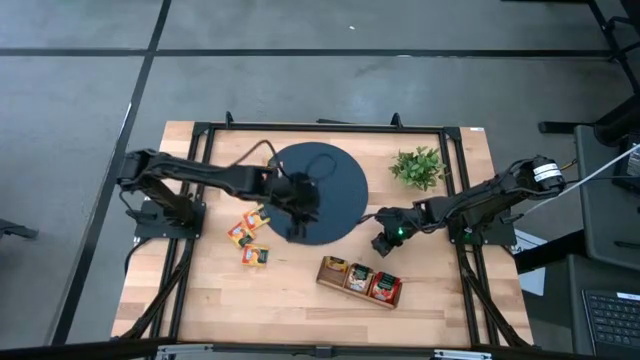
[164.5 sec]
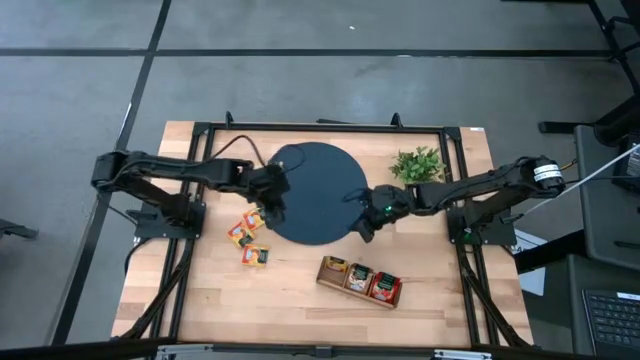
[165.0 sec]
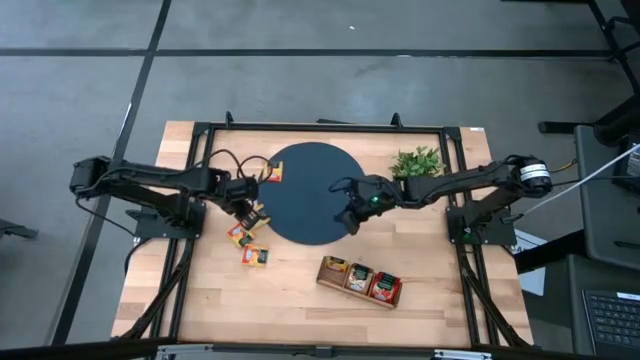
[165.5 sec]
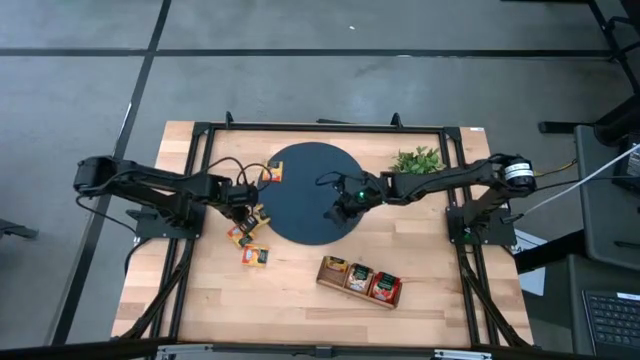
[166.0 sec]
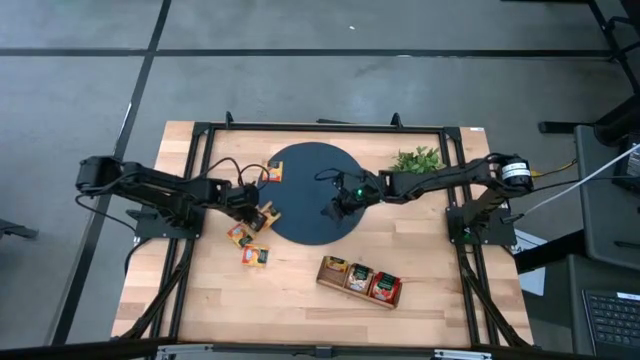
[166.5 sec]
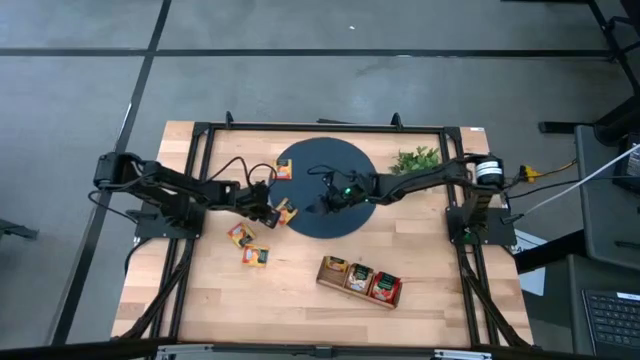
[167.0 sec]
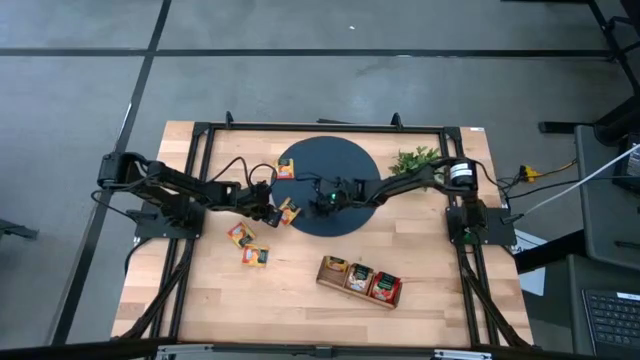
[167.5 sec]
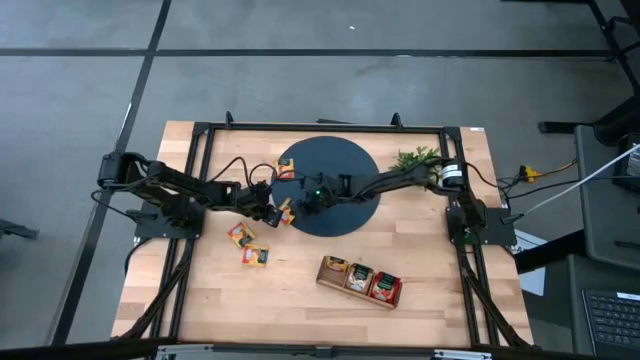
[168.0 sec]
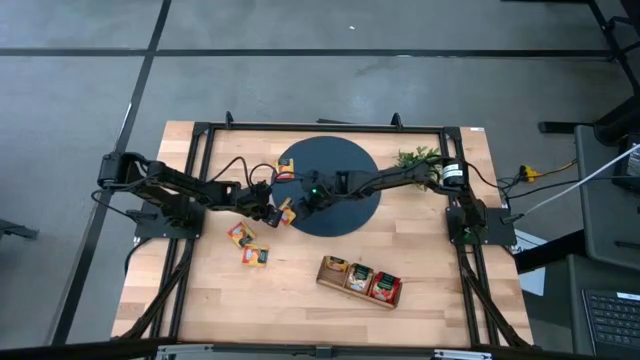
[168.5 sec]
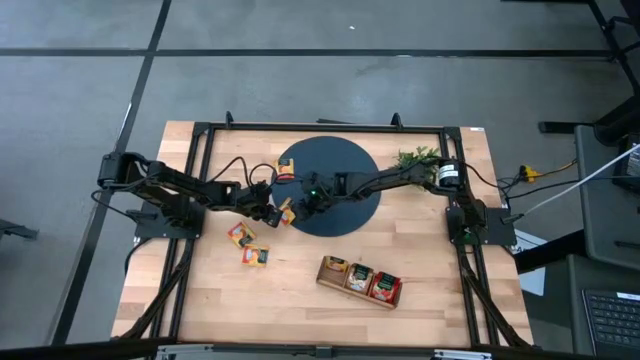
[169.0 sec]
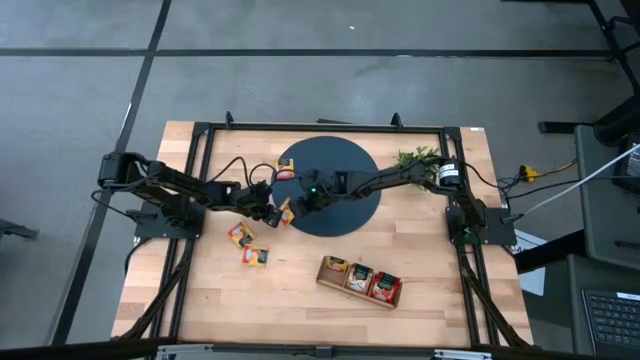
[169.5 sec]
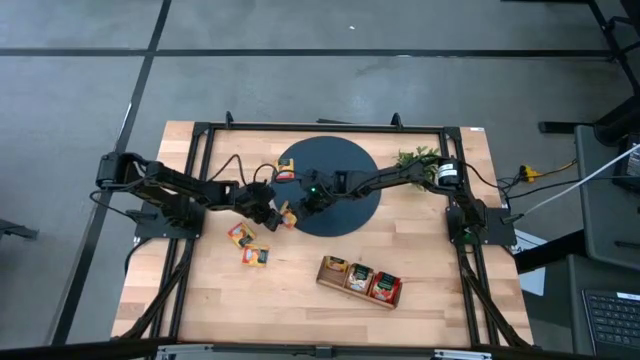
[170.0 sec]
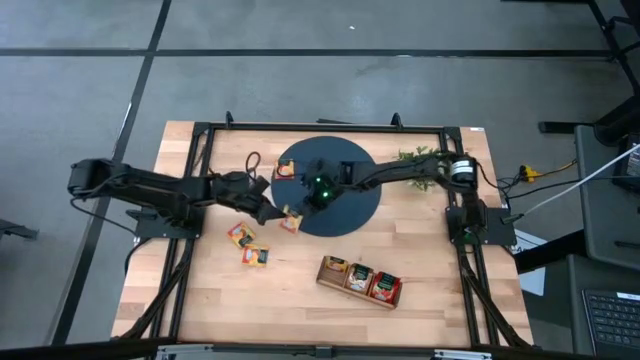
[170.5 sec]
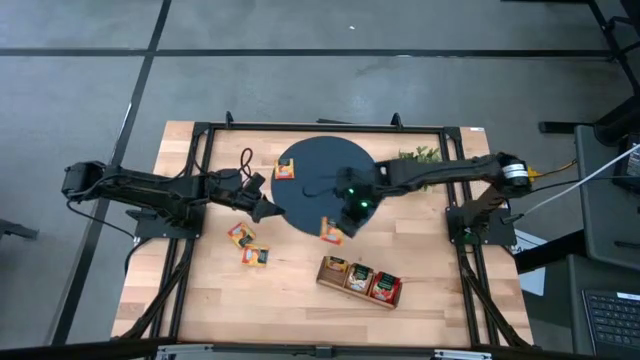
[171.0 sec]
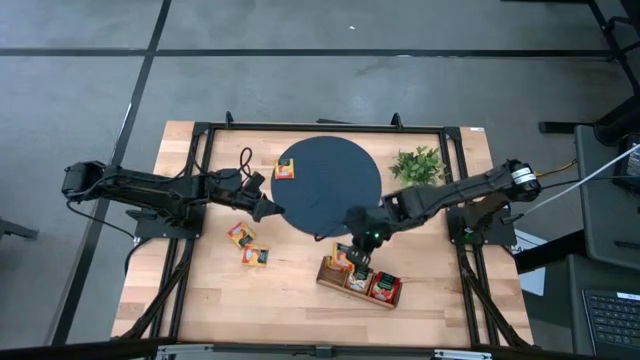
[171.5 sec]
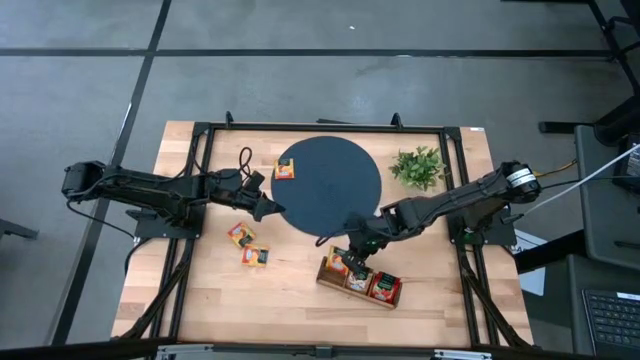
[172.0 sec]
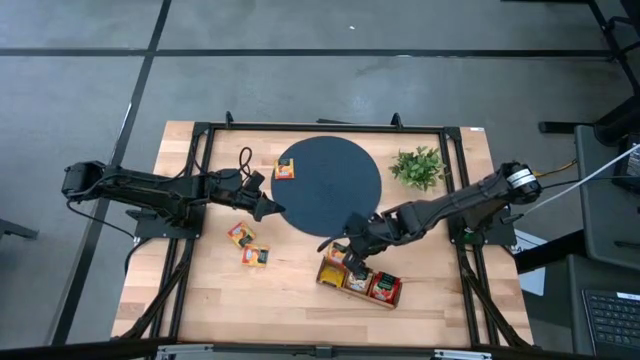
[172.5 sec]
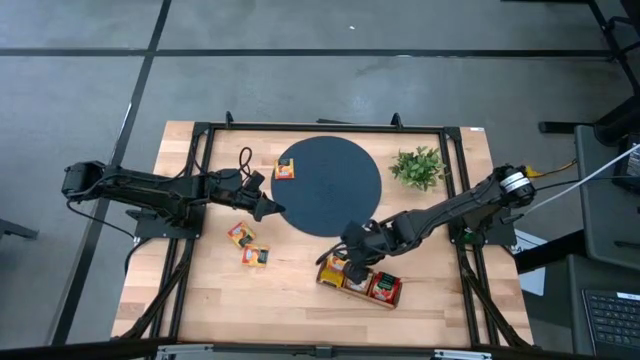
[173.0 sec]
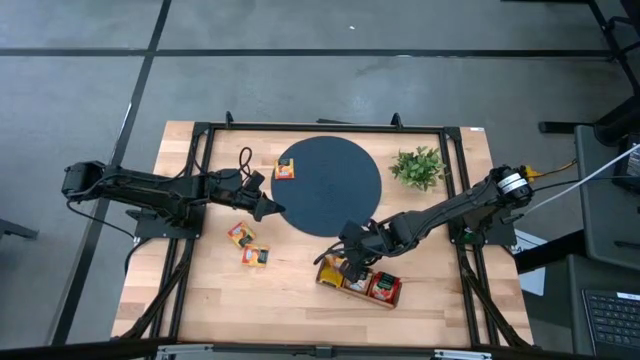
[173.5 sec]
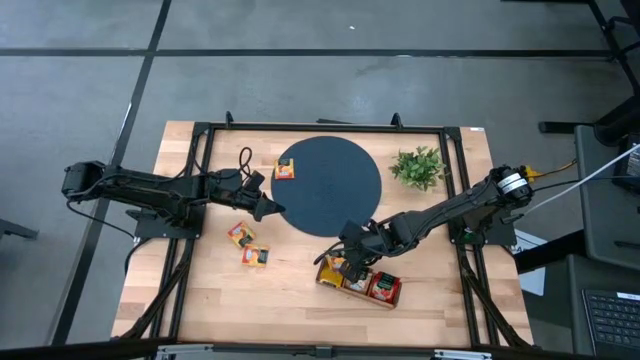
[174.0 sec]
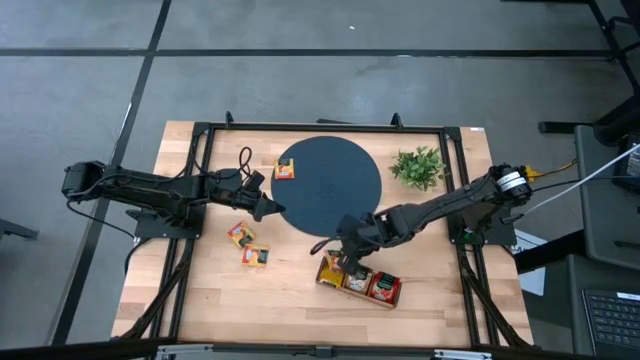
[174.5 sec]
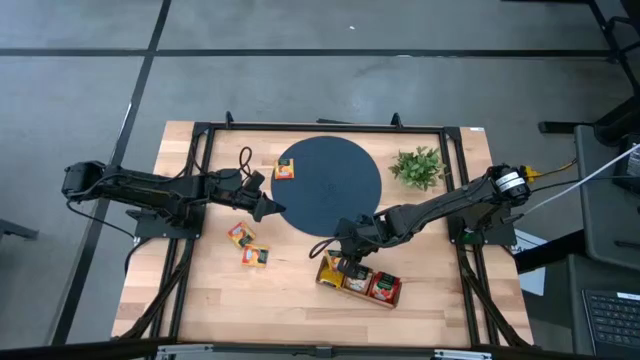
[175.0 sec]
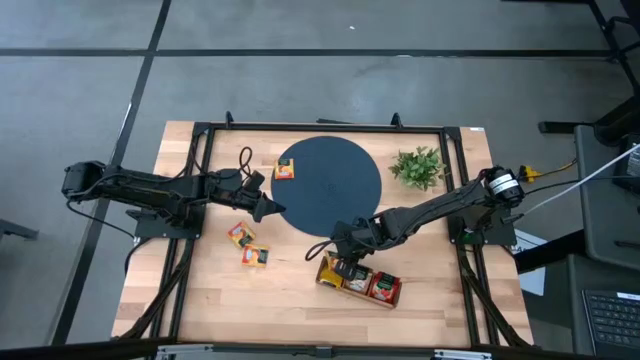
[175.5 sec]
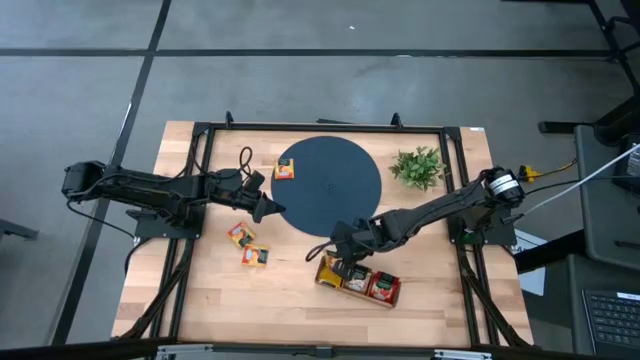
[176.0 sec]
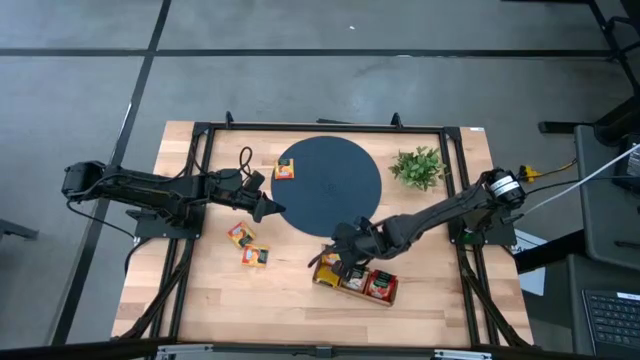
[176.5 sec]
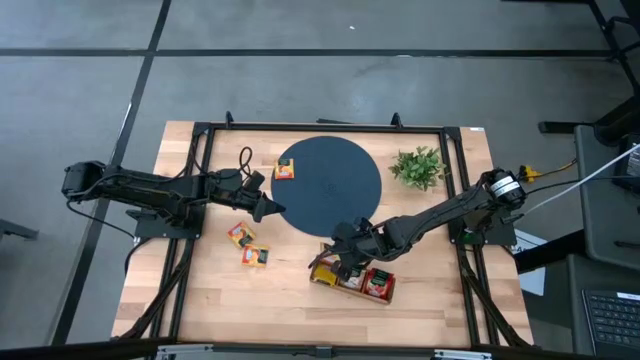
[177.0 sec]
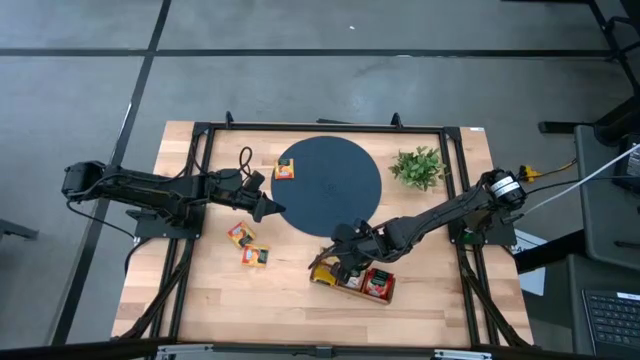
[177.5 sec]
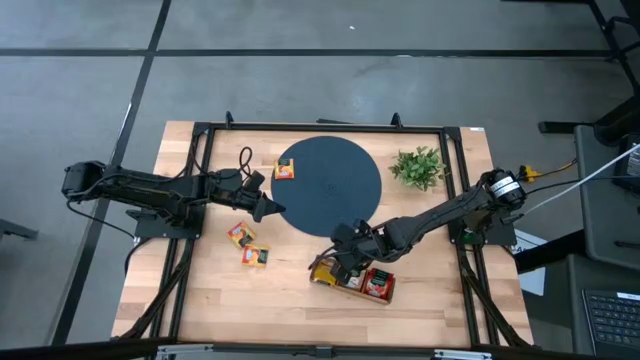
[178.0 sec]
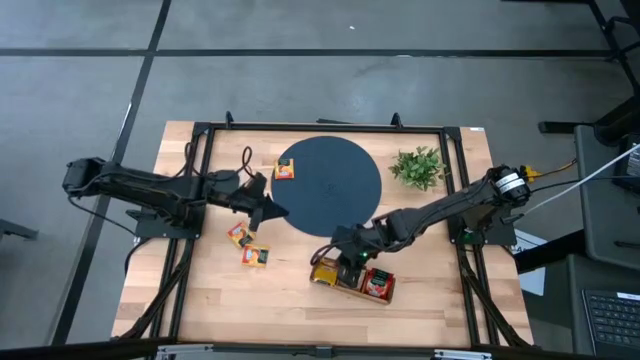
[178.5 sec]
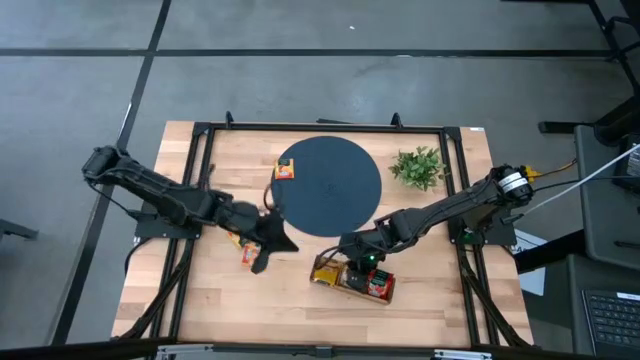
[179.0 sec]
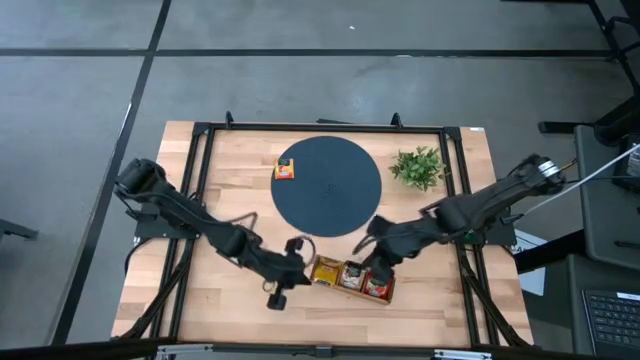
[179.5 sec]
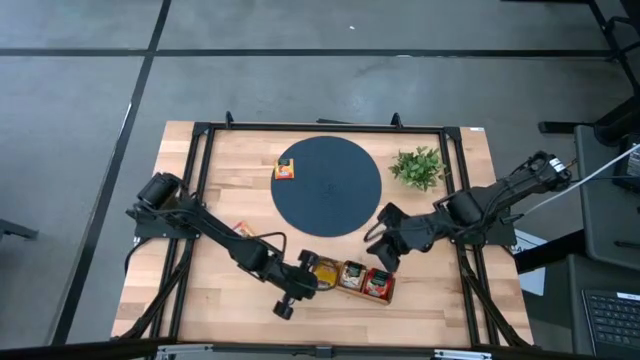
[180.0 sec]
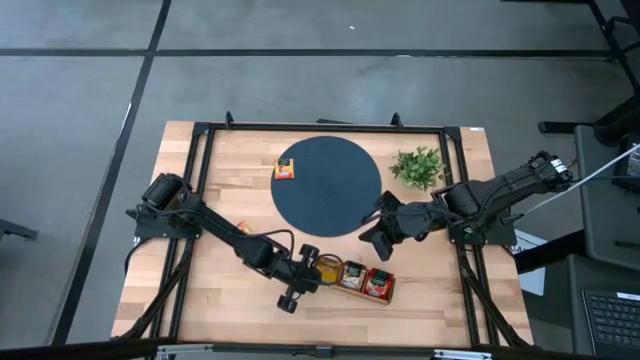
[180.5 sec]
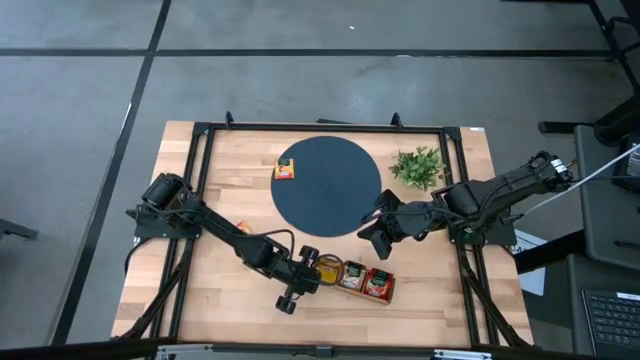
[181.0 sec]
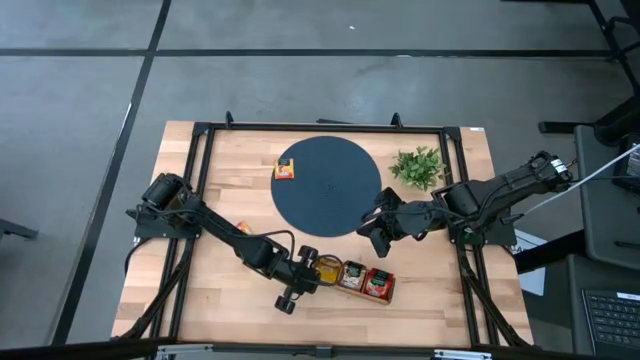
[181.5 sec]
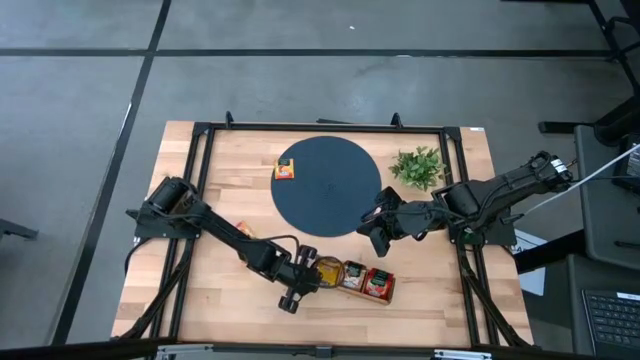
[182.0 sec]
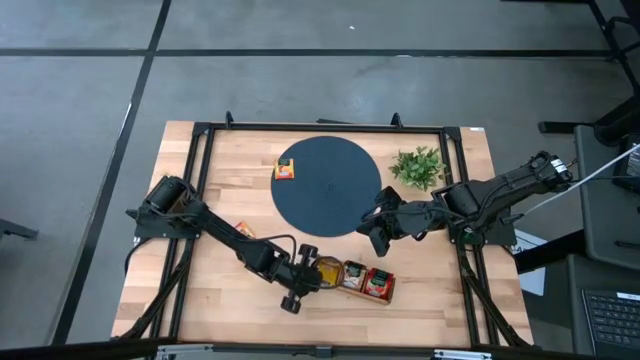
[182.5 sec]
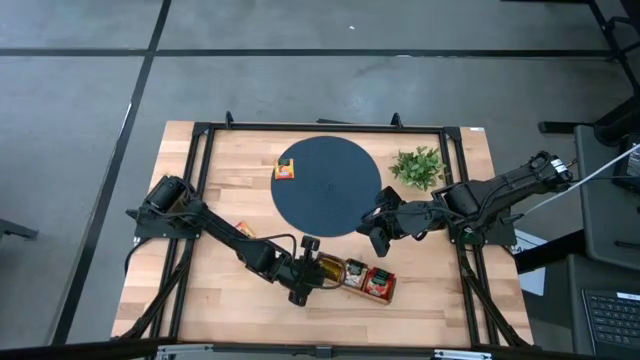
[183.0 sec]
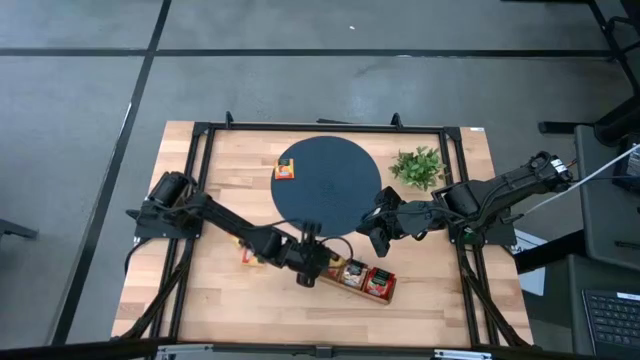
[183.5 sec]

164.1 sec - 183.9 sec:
Task: Pick & Place Tea
Put the yellow tea bag into the left section of the wooden organizer
